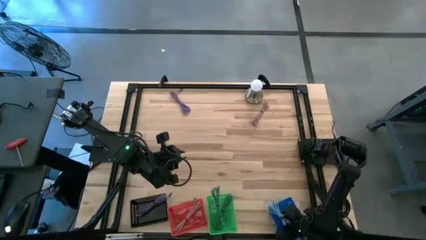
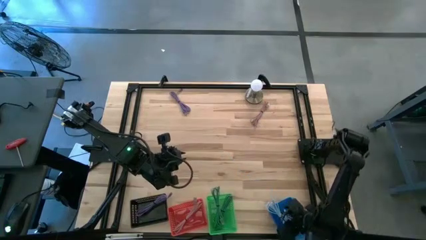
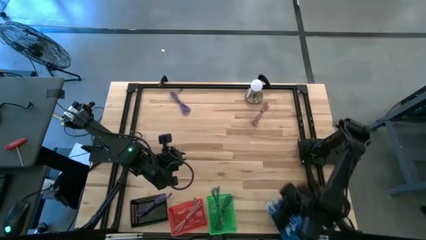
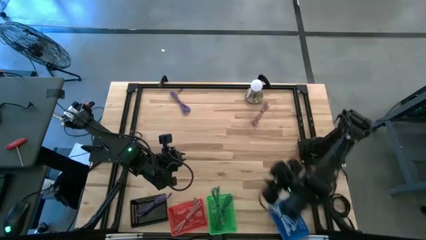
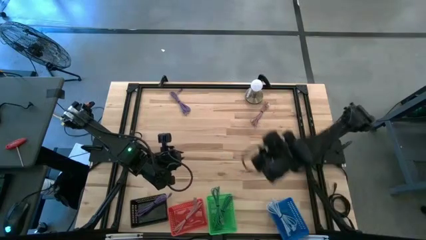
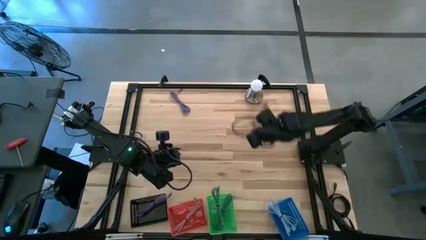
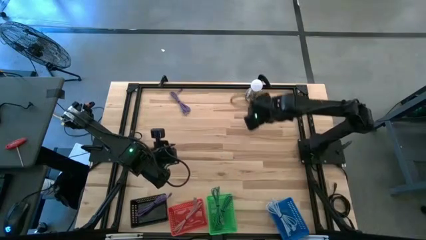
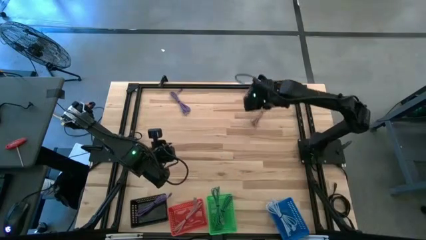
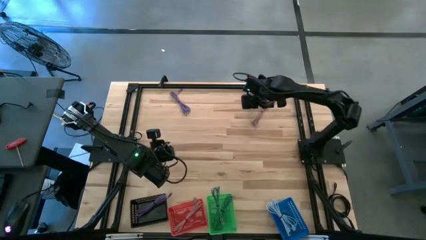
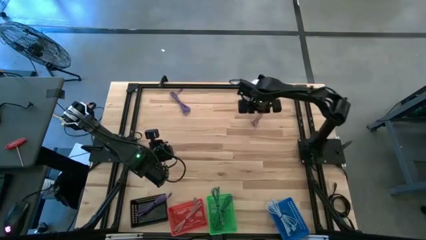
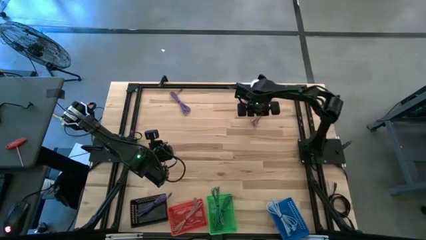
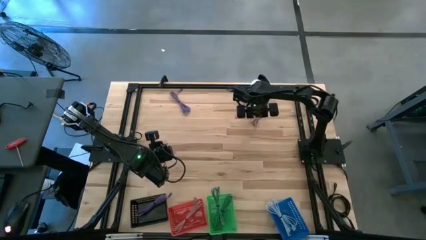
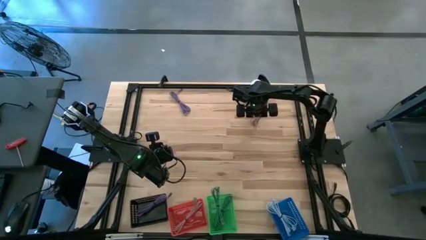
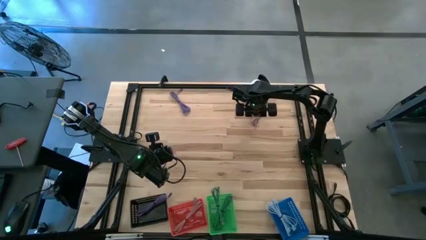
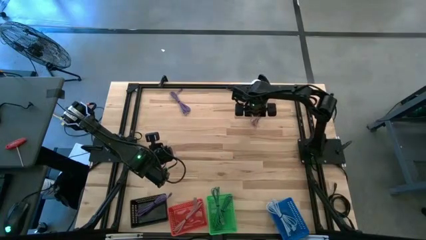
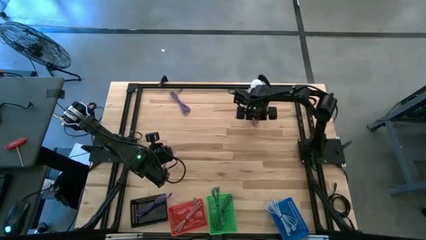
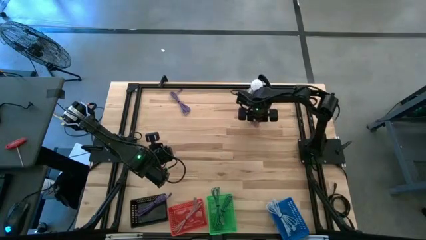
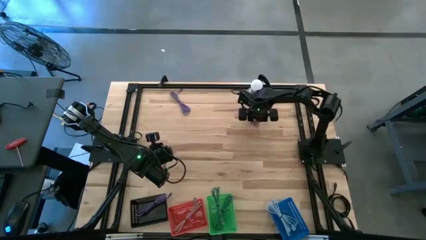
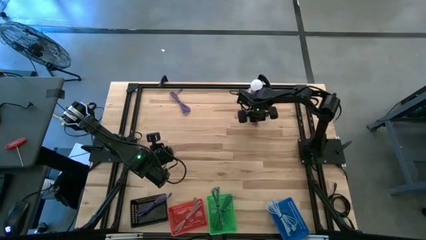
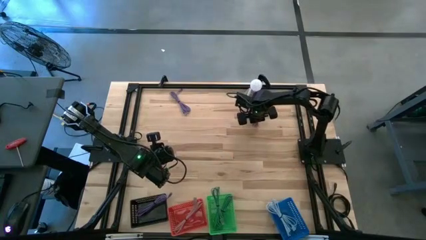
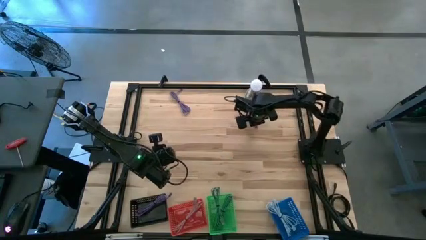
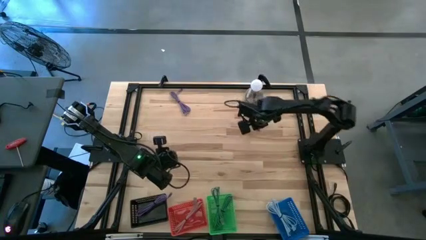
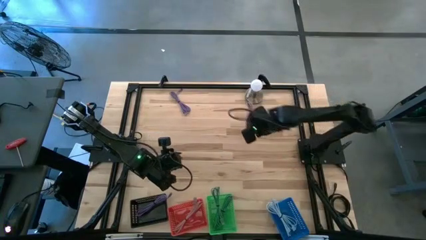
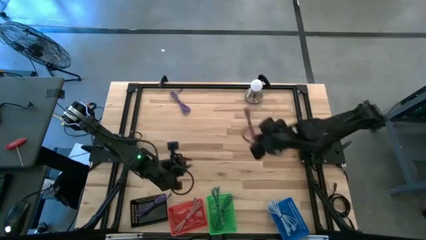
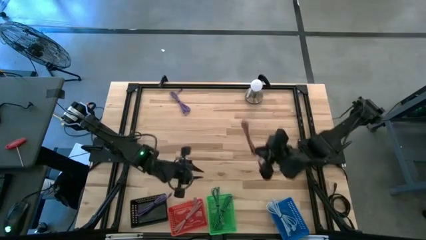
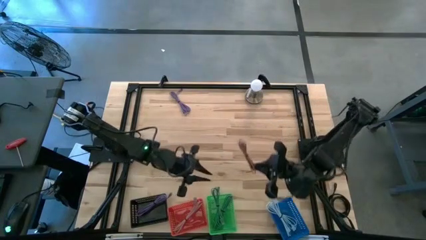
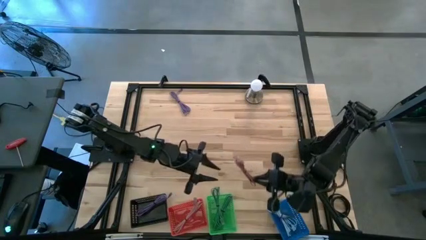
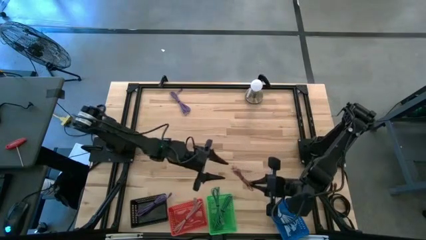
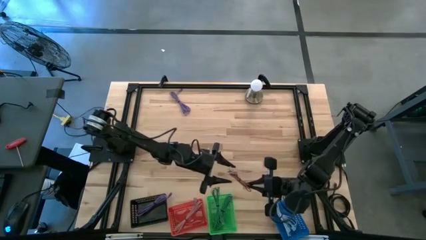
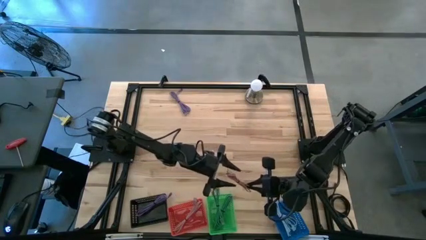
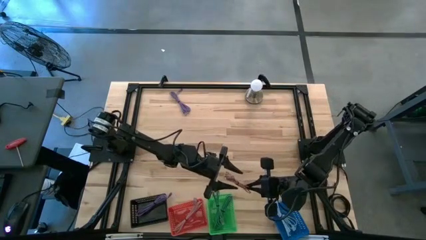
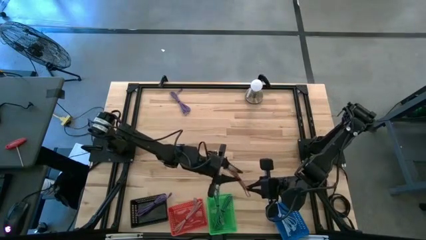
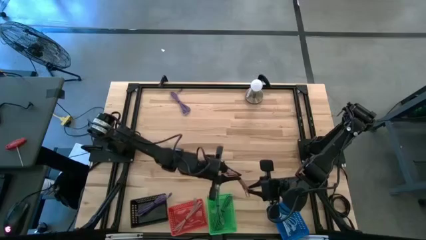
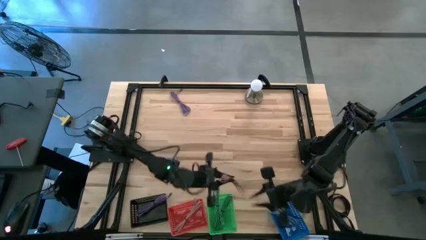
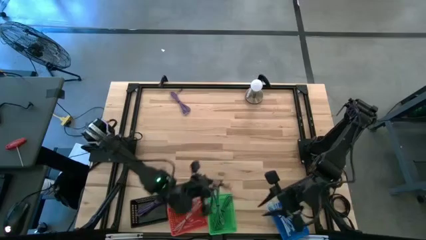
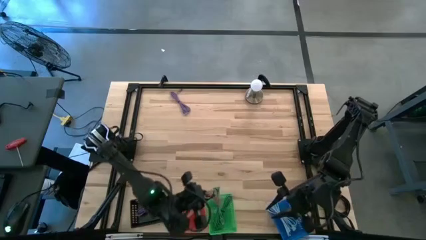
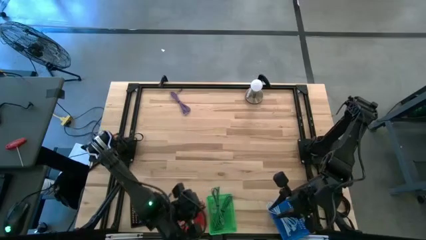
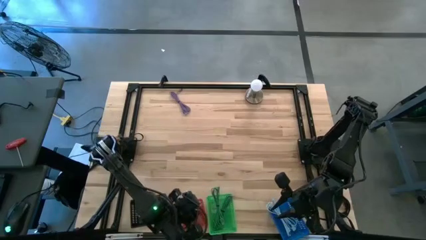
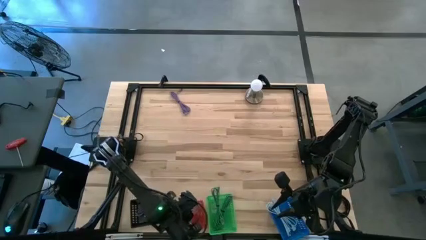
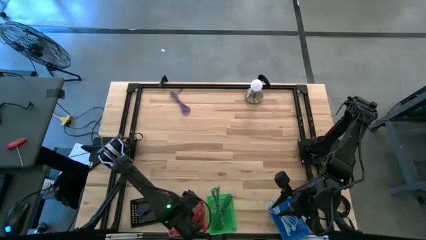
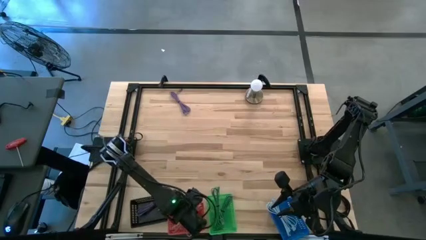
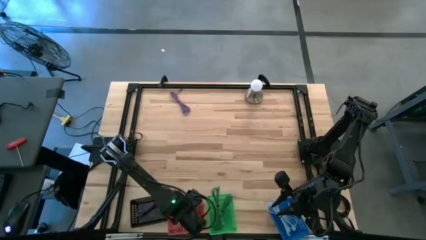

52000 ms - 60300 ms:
Task: Pick & Place USB Port
Put the pink charger cable into the red bin

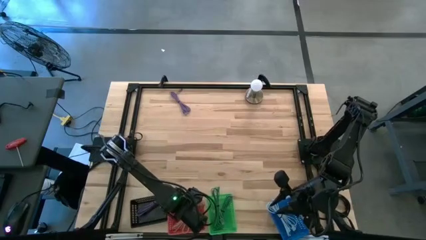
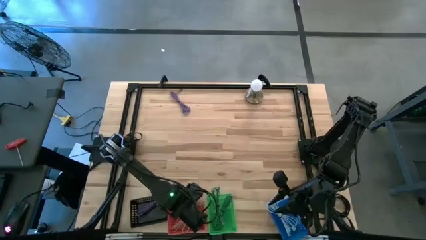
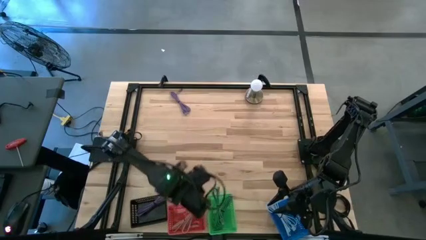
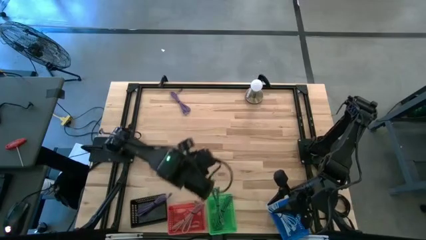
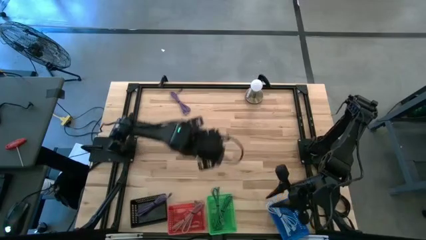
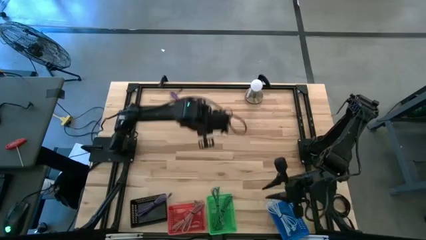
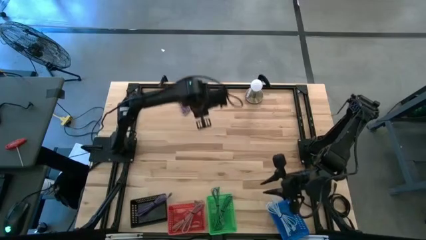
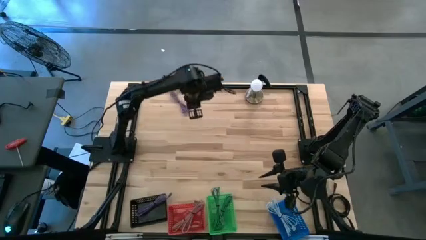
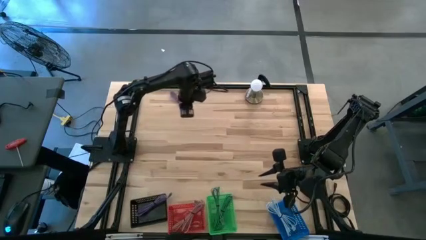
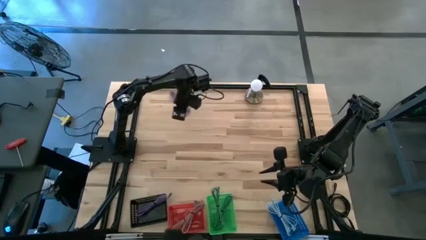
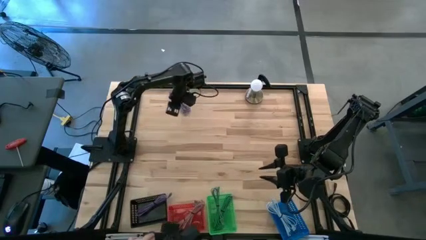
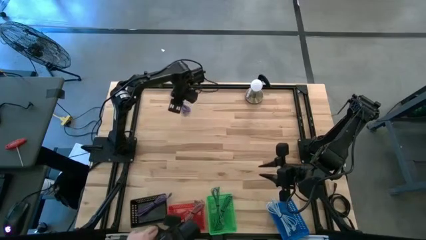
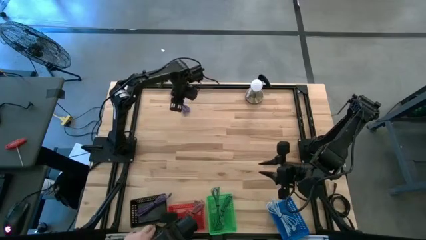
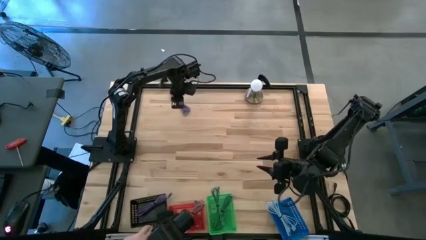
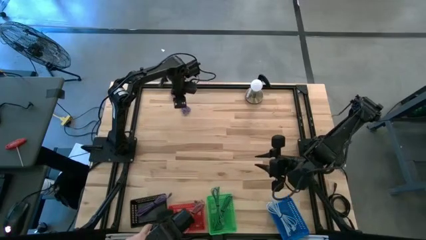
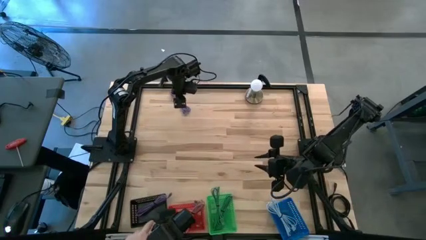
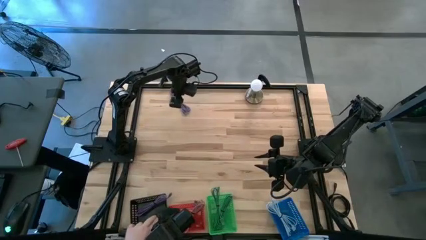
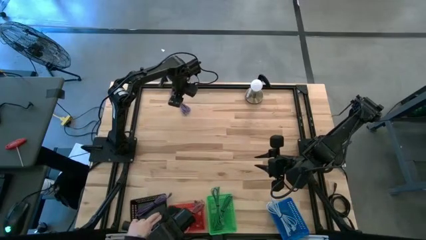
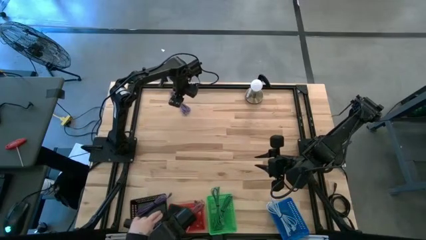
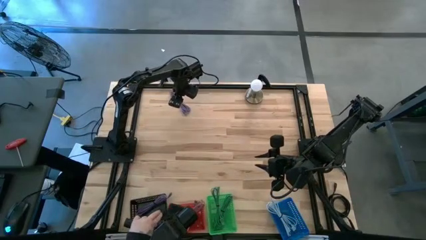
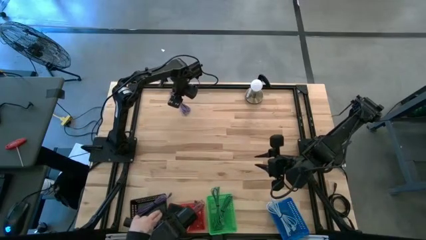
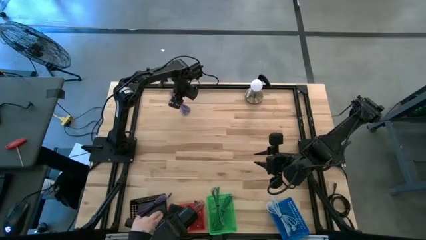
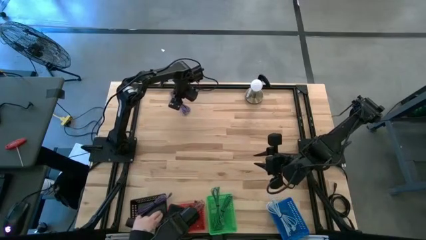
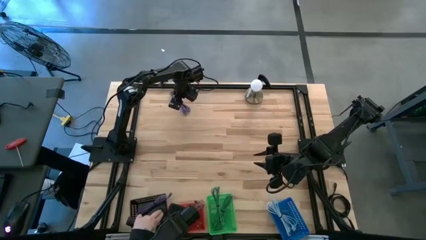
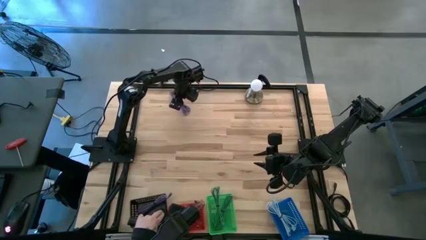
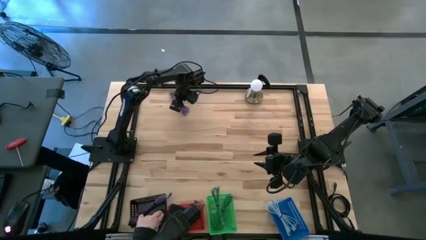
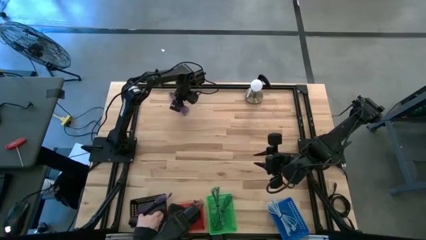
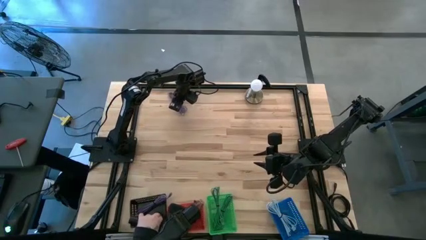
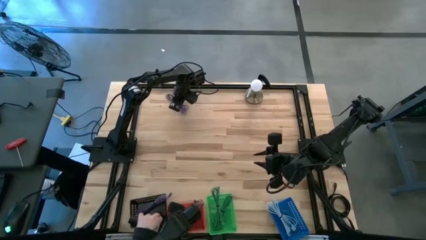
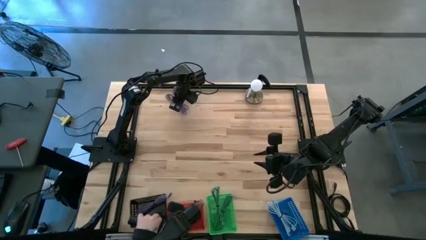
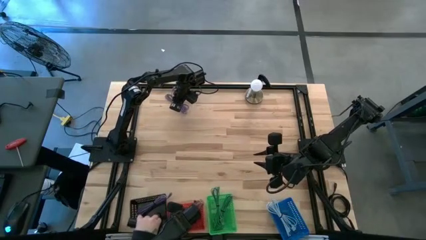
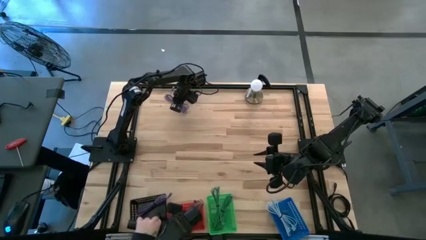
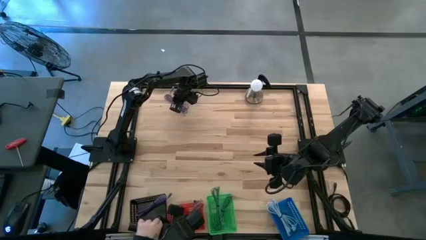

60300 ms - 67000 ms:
Put the purple charger cable into the black bin
